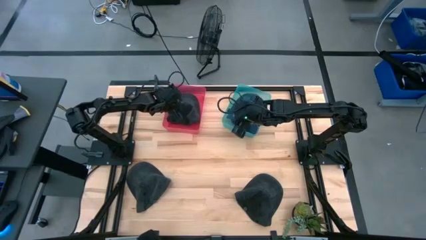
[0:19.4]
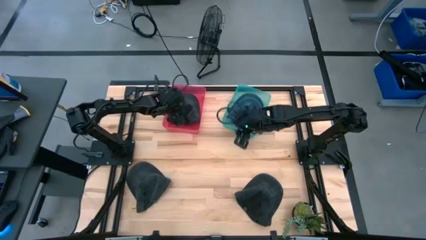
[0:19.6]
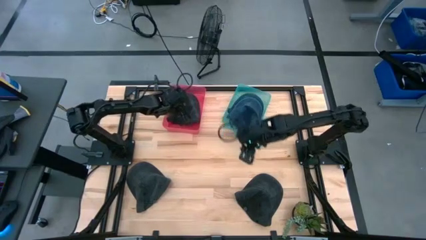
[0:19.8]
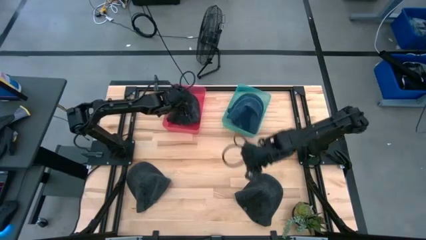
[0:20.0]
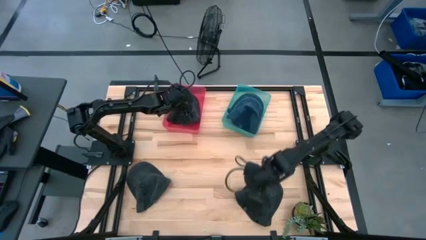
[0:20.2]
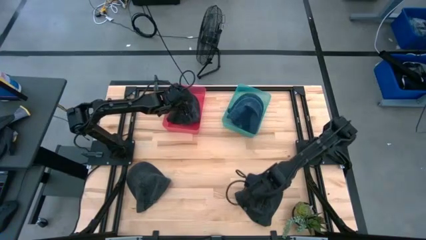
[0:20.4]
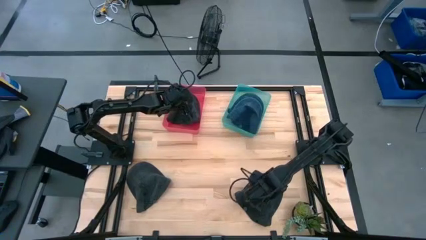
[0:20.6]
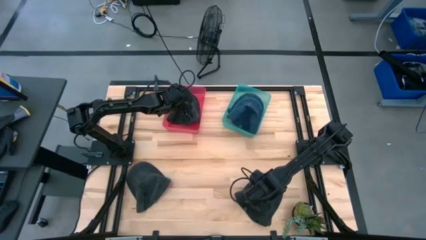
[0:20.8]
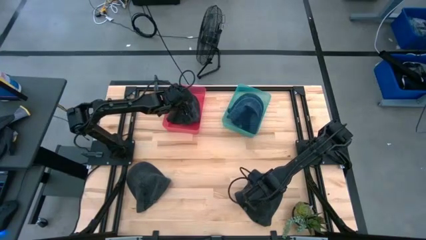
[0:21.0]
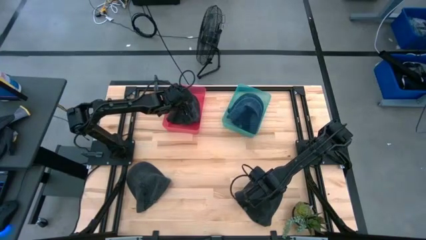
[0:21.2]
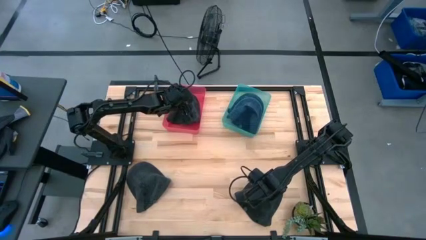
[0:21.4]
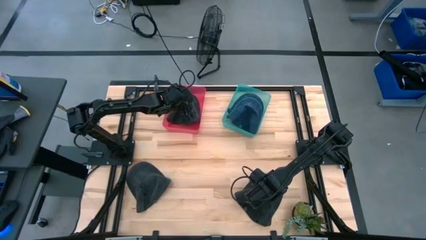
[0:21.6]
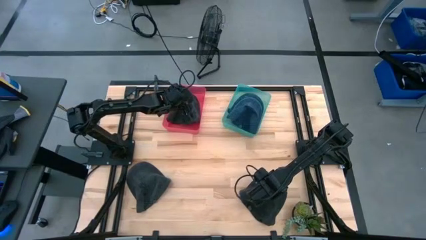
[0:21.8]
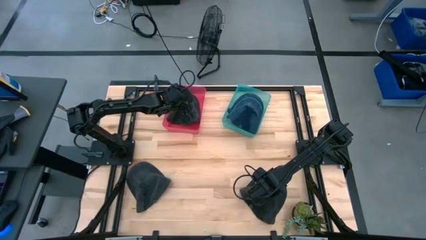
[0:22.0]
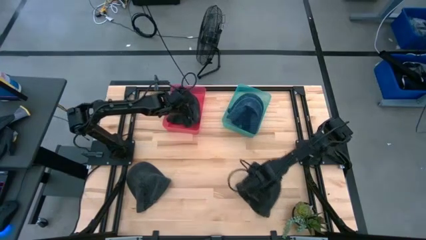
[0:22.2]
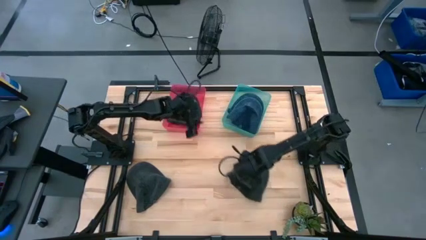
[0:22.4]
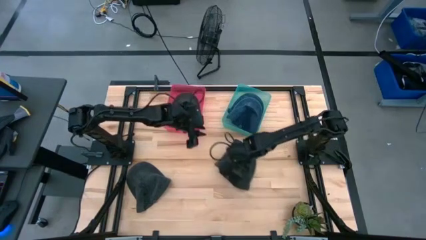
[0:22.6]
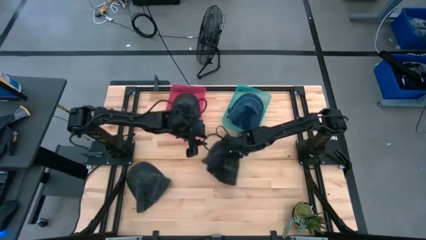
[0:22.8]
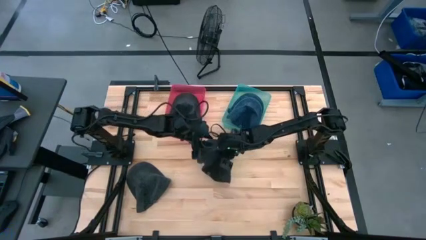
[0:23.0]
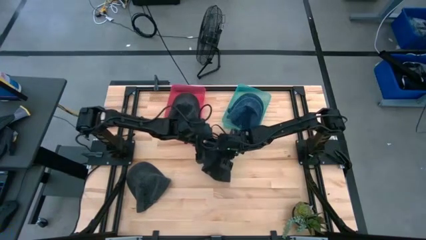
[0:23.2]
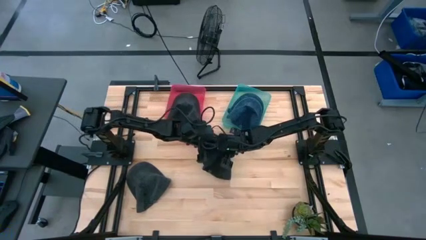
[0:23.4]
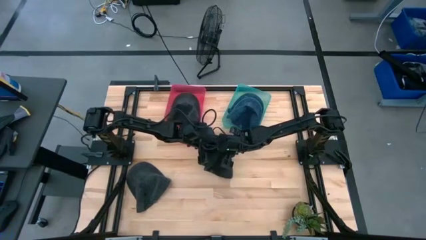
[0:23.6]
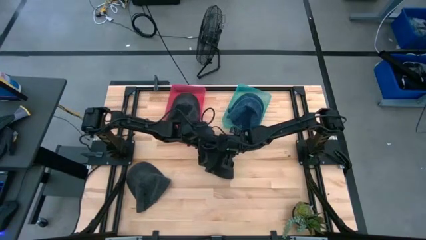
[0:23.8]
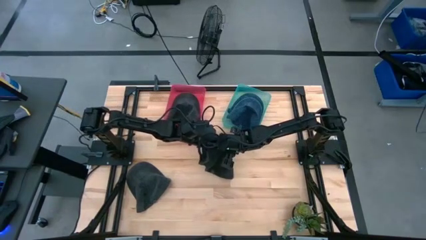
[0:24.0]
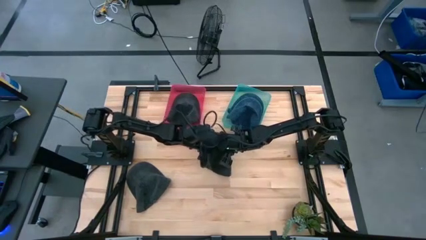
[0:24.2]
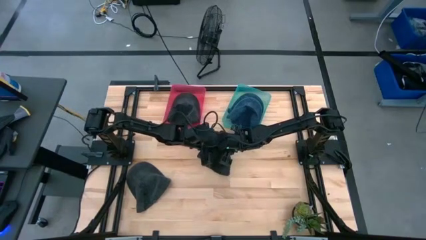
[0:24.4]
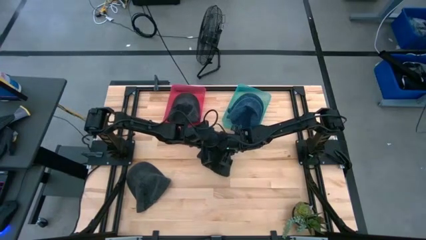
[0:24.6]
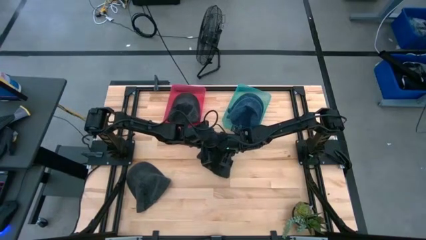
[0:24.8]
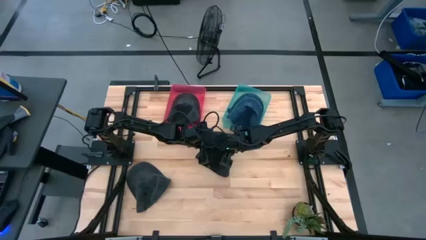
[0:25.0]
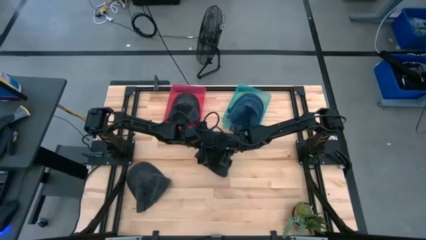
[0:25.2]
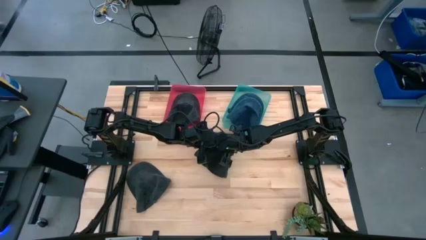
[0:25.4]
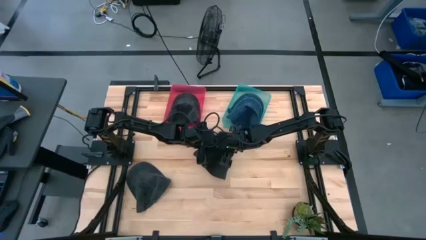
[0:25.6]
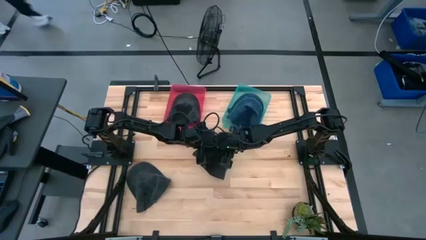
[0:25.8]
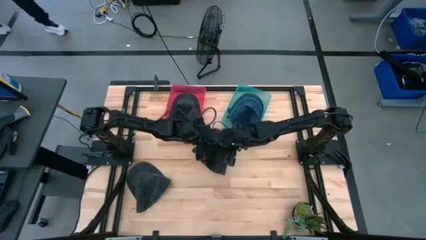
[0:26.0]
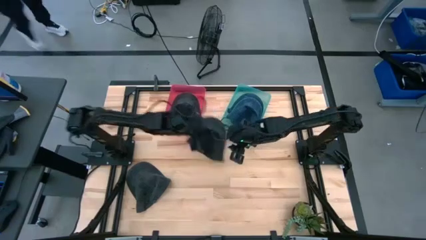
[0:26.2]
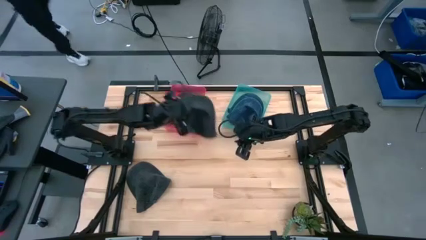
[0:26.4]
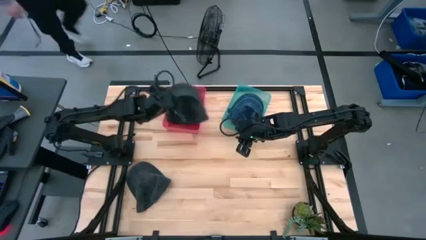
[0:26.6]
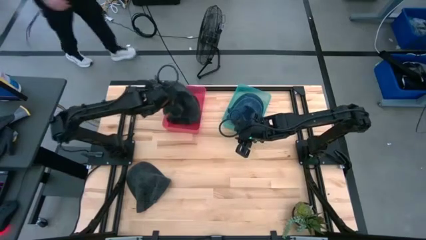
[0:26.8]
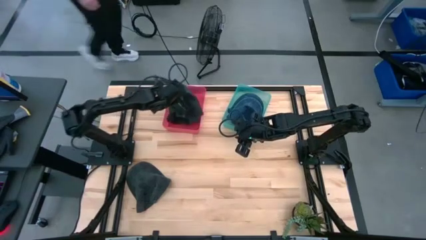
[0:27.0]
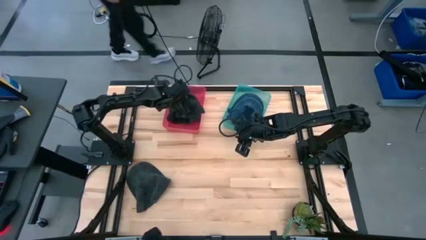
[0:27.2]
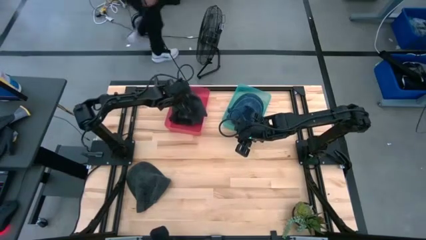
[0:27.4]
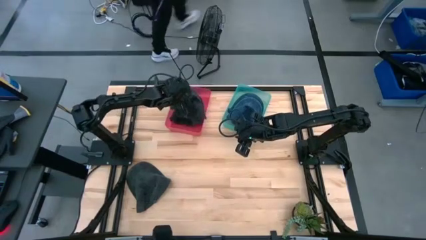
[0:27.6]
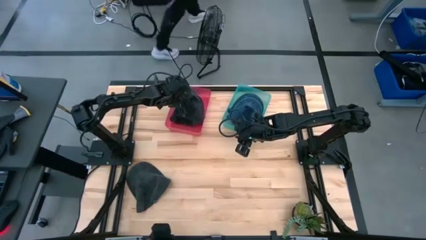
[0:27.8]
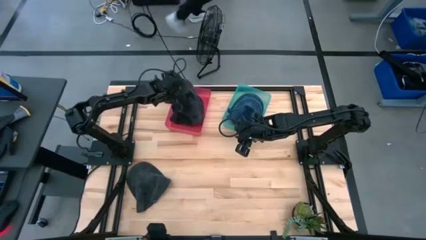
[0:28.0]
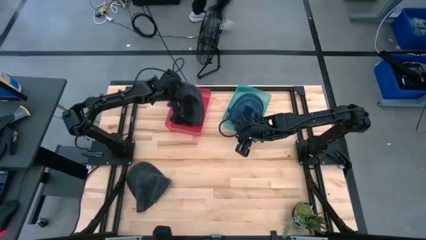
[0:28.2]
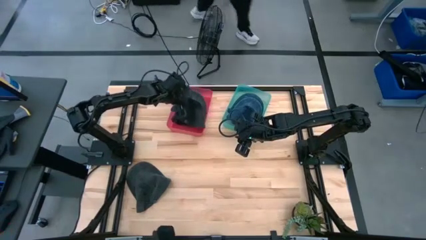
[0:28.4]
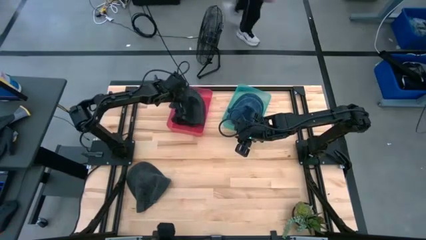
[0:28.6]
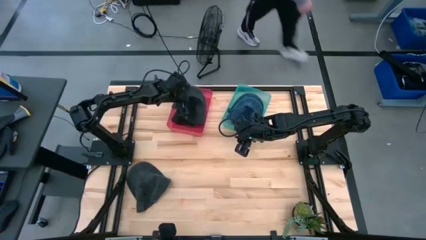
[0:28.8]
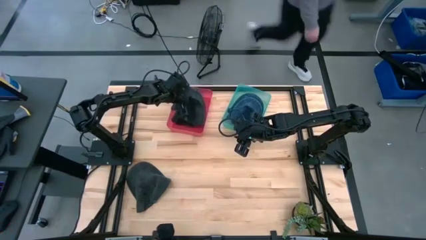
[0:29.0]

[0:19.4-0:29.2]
Task: Pick & Place hat
Put the right black cap into the red bin

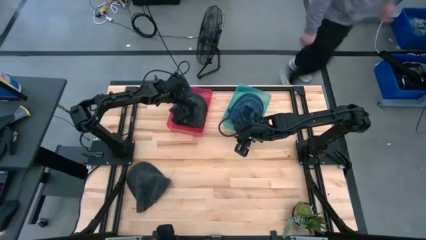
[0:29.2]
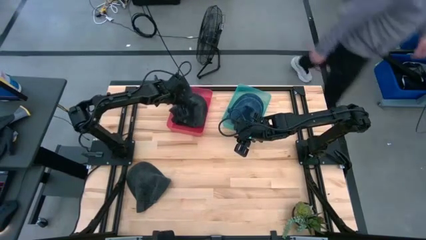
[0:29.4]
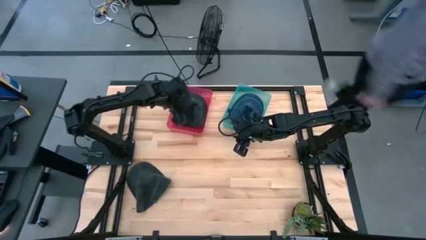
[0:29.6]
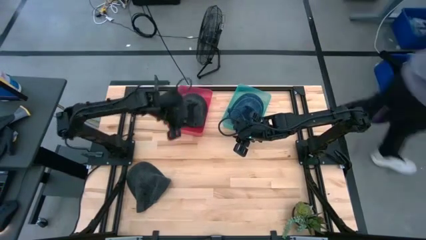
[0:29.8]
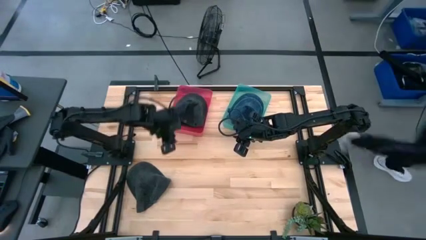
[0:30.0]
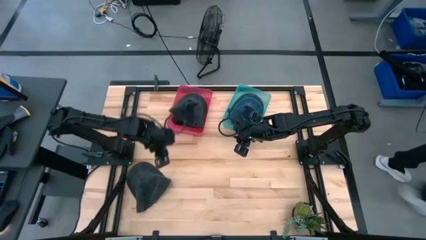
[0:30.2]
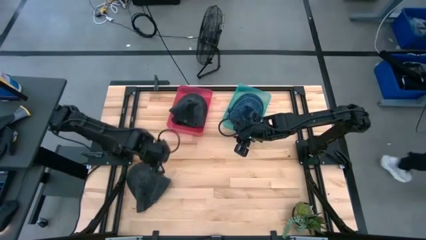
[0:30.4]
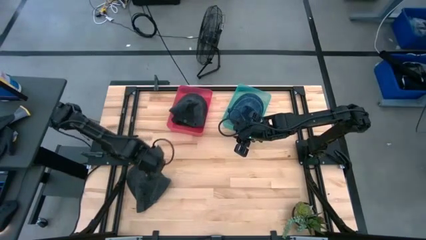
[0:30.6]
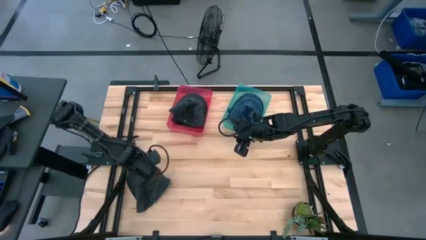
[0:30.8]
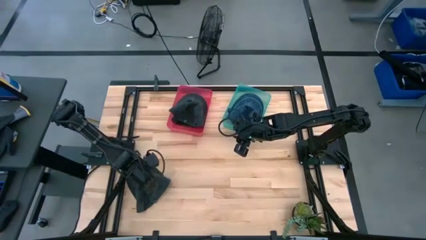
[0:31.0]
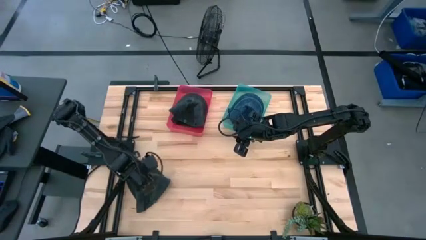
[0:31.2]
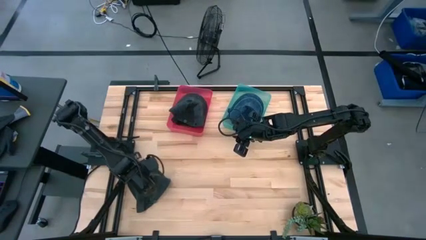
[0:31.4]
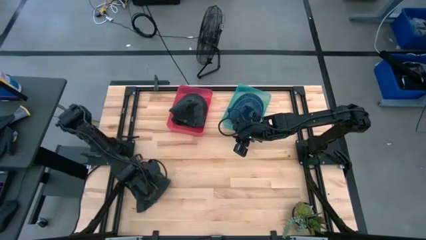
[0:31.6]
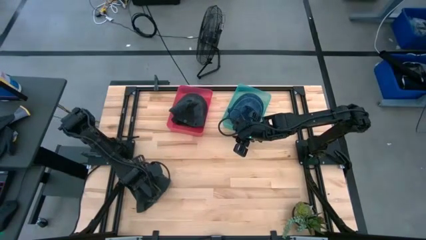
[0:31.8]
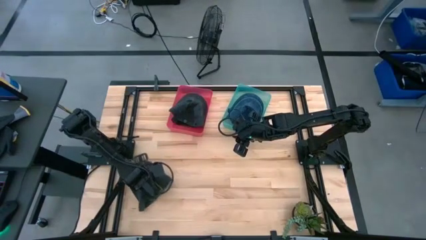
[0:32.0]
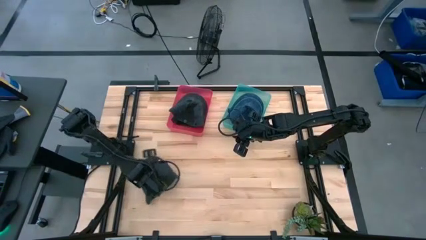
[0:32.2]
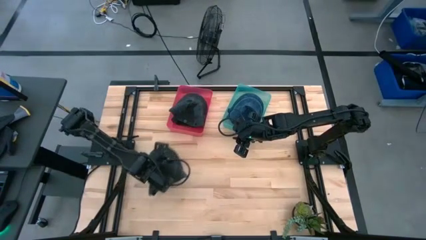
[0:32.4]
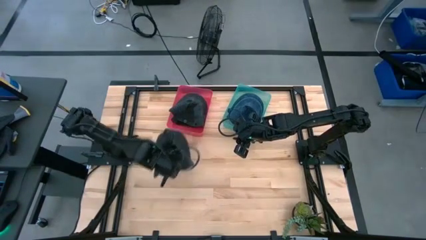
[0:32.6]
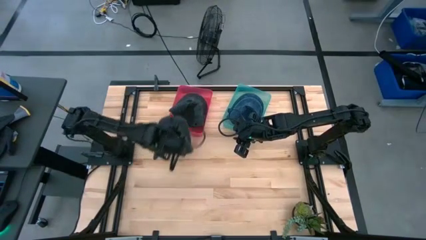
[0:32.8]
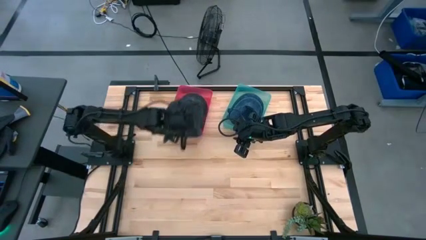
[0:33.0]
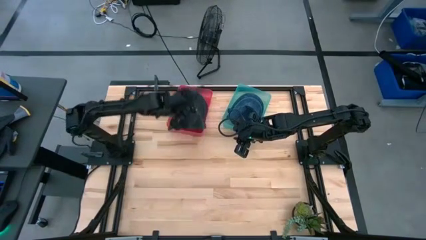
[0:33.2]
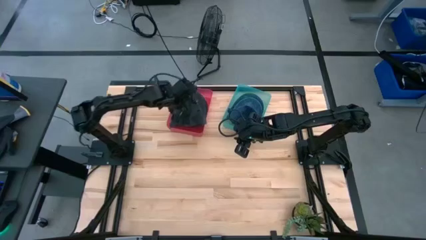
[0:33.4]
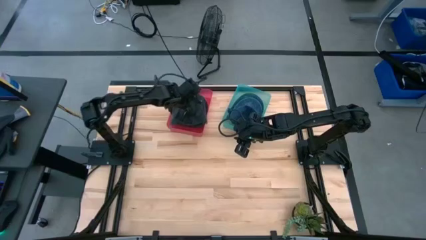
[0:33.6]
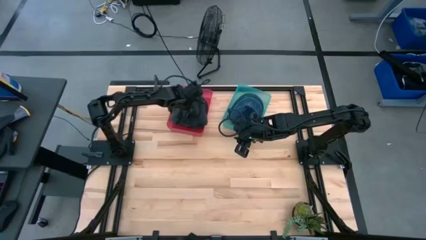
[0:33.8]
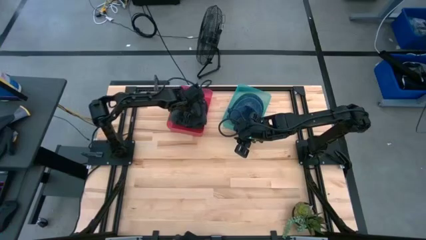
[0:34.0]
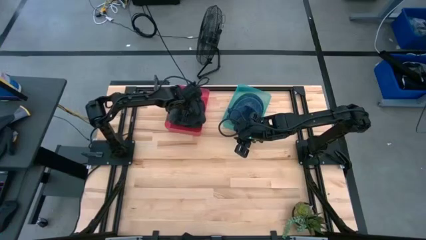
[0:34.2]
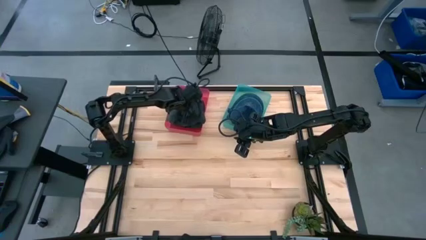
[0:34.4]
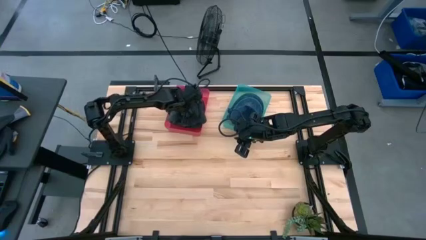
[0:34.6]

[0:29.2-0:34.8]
Put the black cap into the red bin
